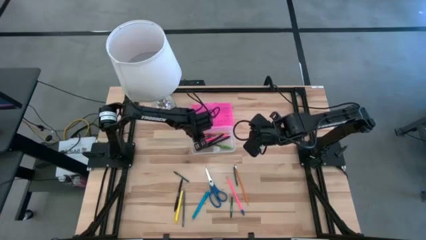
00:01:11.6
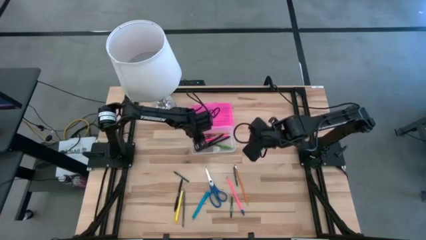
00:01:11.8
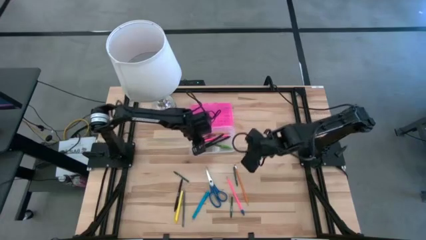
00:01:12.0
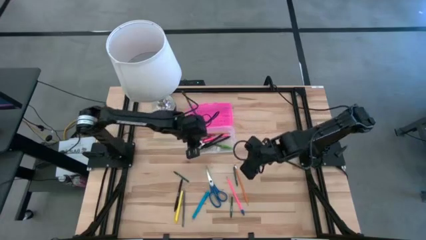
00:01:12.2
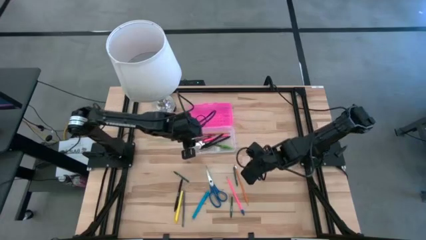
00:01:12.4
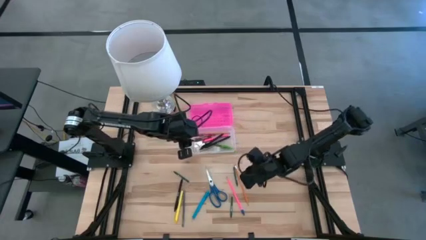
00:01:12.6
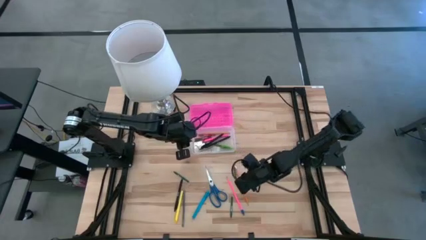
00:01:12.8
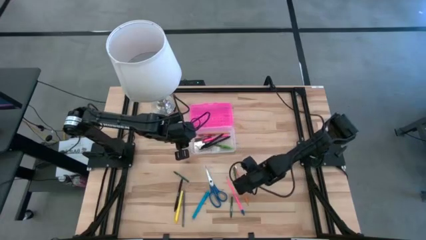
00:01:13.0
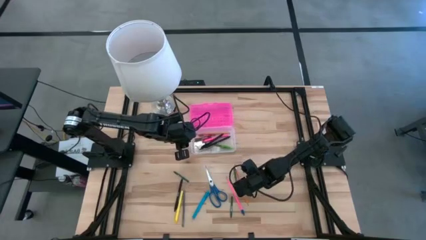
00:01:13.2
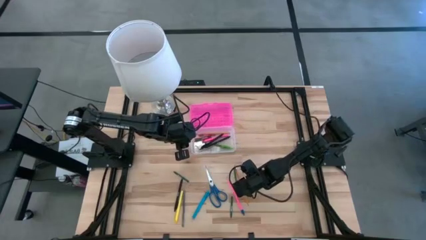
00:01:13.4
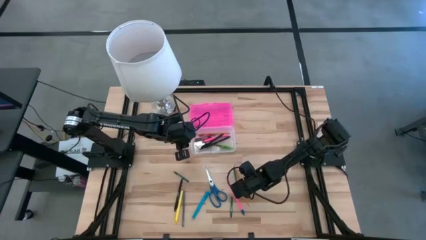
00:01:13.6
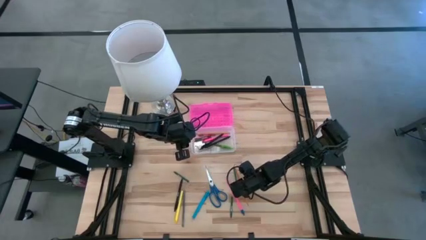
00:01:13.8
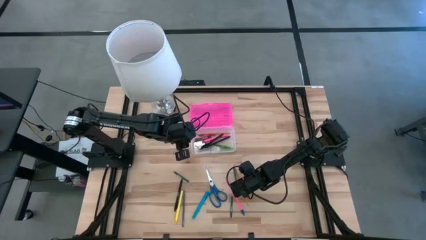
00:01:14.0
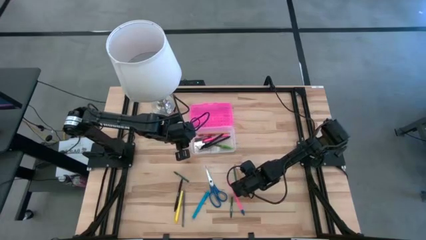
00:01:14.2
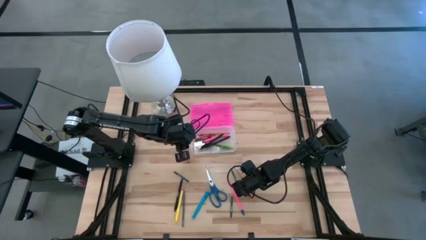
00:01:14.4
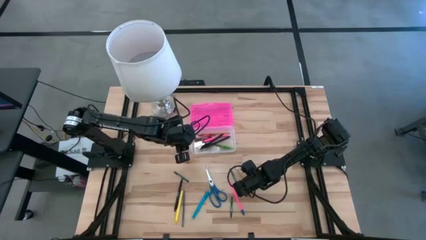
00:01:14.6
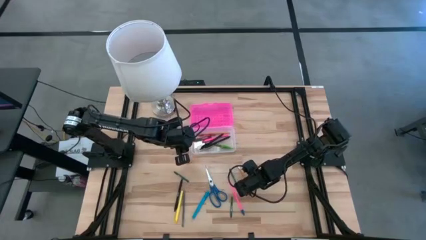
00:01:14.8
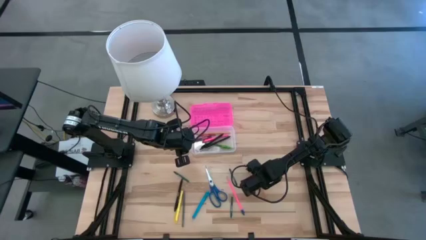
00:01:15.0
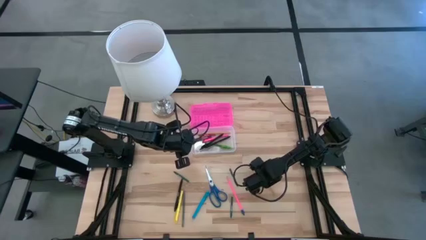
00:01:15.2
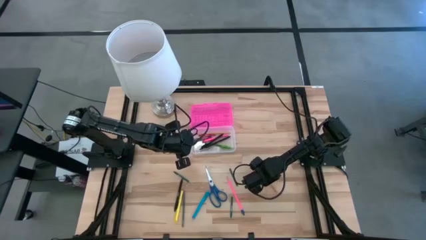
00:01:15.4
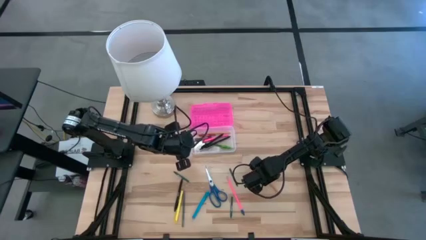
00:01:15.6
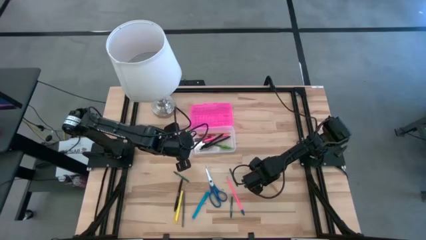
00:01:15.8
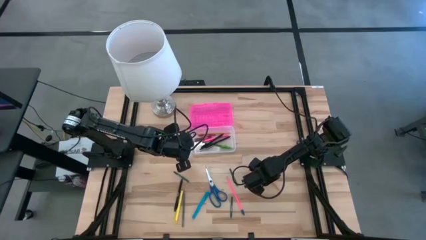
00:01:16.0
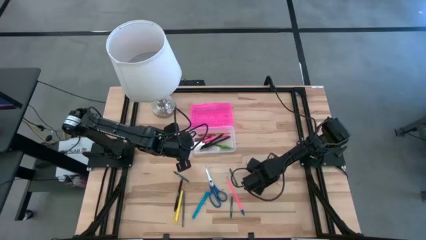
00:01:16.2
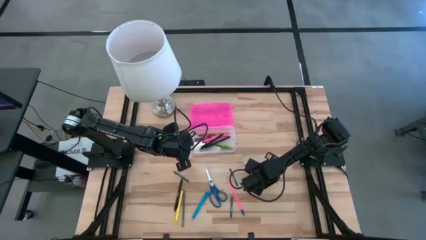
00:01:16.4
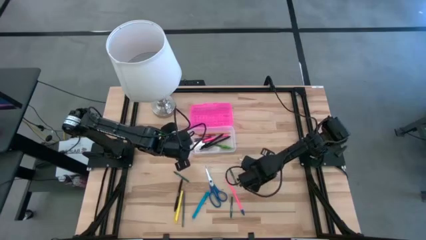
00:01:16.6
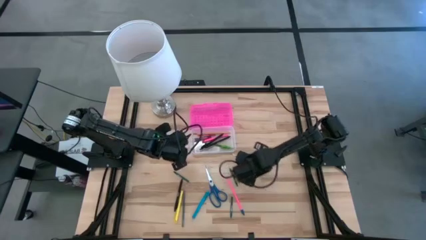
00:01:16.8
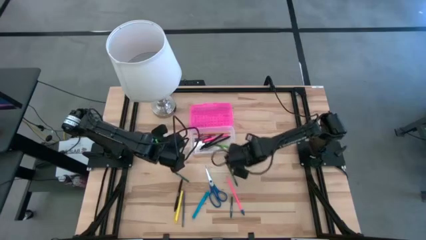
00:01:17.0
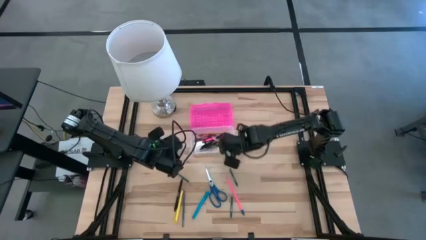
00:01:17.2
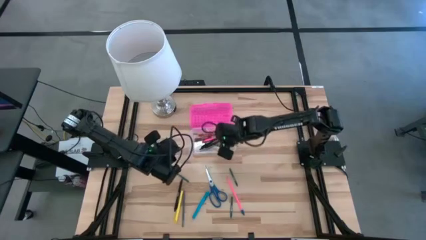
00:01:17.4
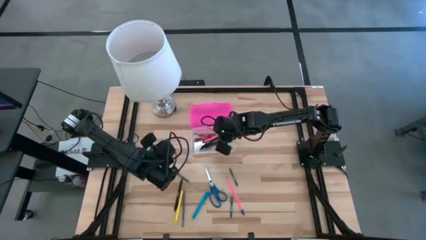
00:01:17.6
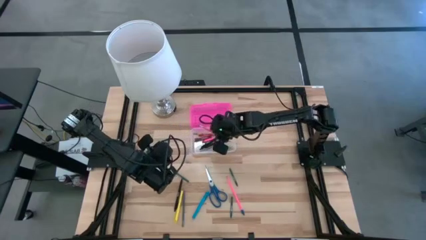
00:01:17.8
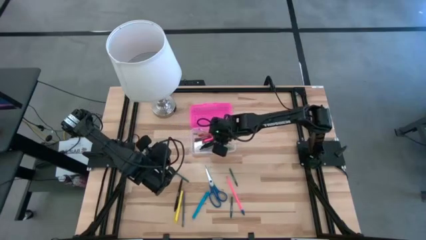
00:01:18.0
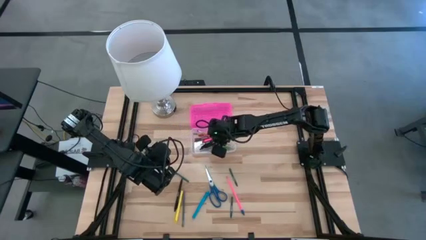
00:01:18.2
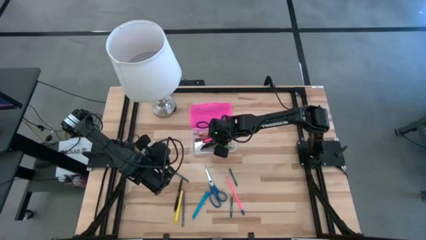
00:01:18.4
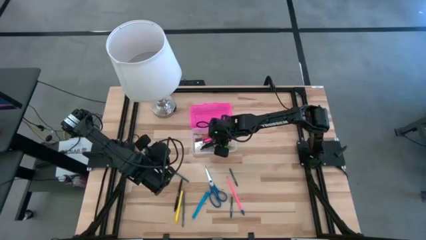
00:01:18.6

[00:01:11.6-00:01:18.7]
Task: Pick & place school supplies into a supply box
Put the yellow pencil into the supply box

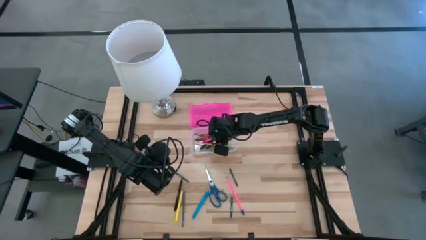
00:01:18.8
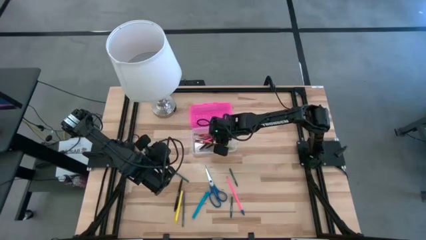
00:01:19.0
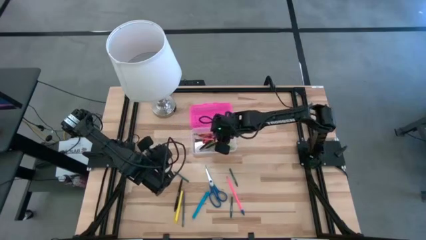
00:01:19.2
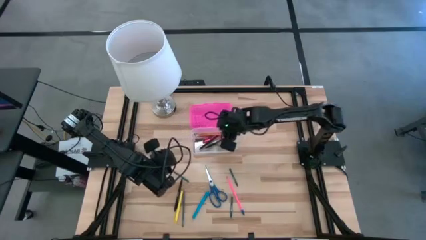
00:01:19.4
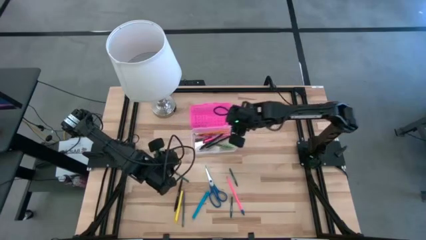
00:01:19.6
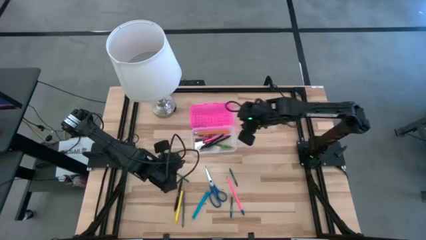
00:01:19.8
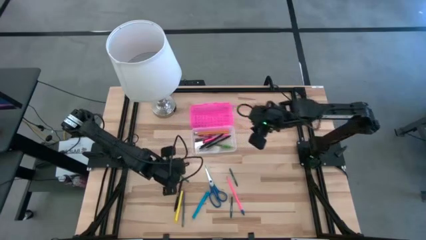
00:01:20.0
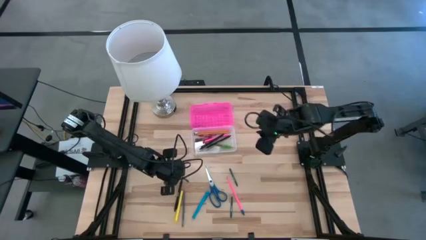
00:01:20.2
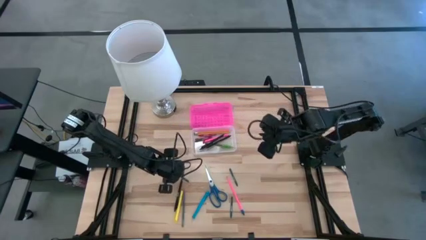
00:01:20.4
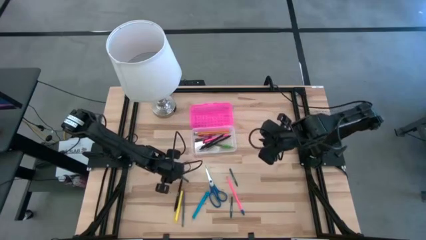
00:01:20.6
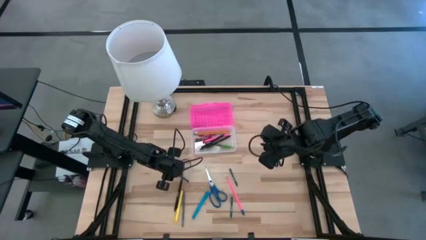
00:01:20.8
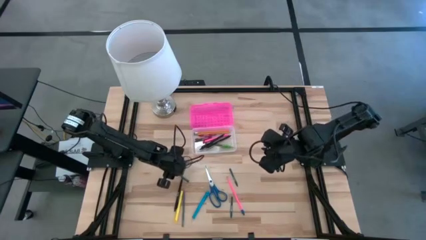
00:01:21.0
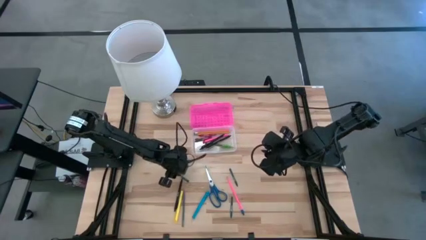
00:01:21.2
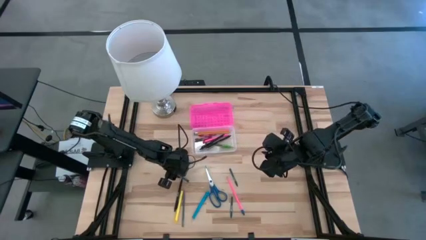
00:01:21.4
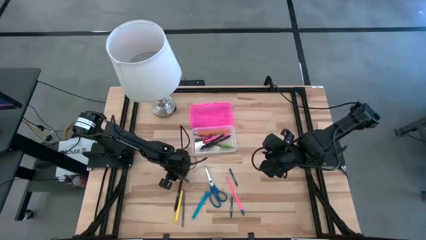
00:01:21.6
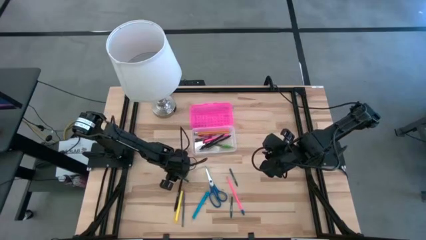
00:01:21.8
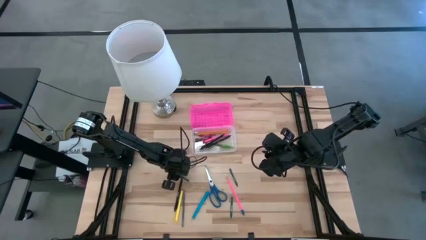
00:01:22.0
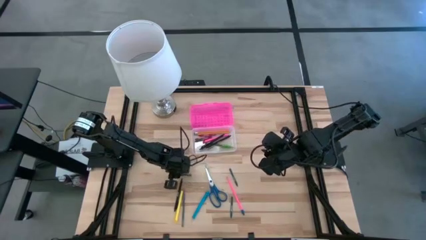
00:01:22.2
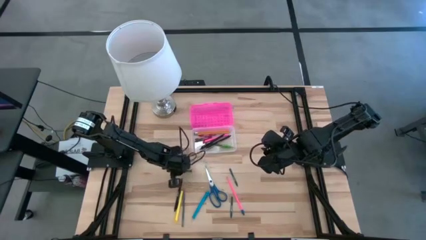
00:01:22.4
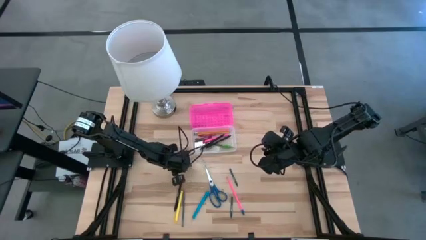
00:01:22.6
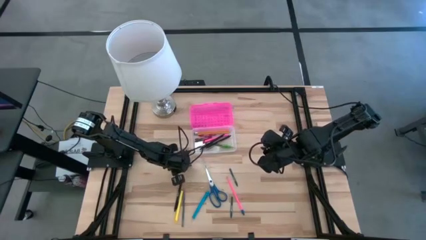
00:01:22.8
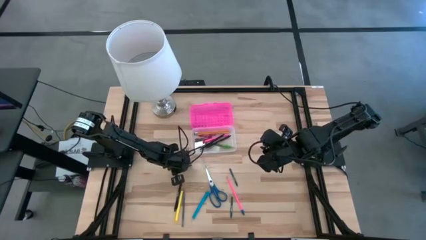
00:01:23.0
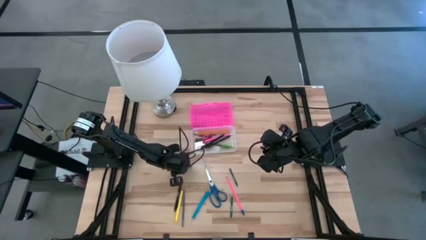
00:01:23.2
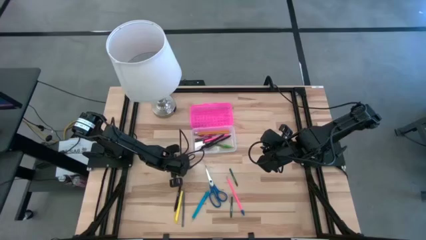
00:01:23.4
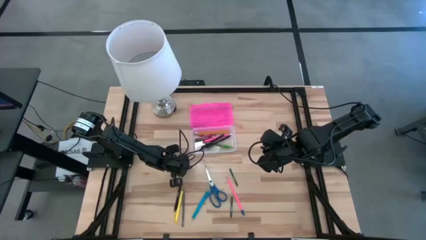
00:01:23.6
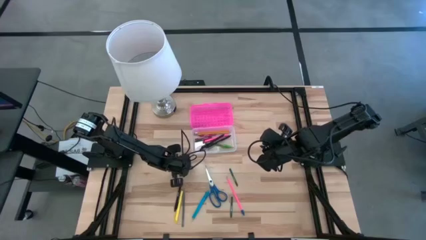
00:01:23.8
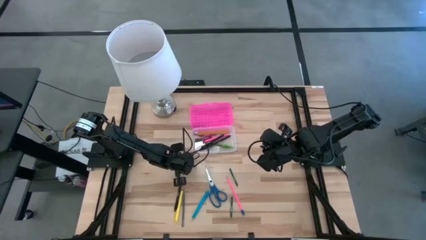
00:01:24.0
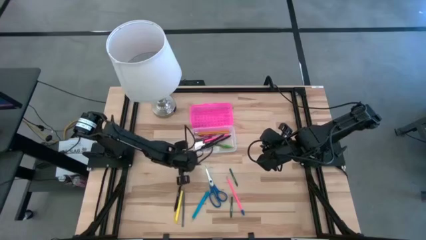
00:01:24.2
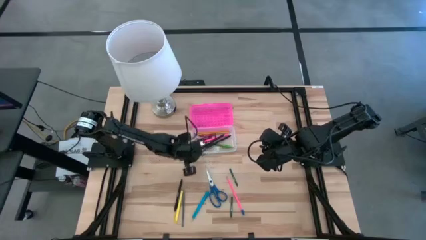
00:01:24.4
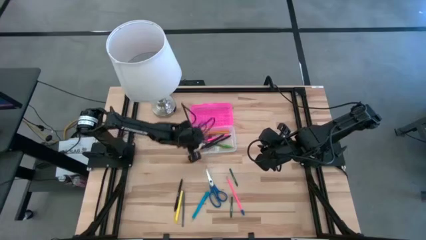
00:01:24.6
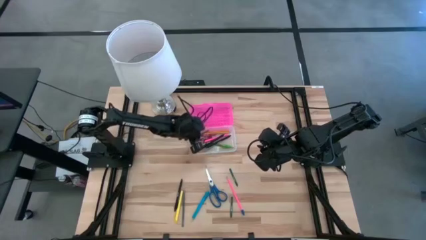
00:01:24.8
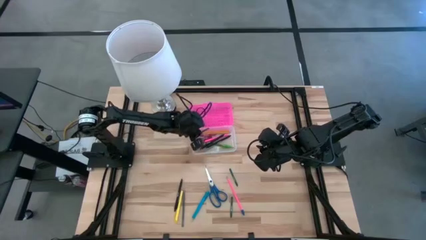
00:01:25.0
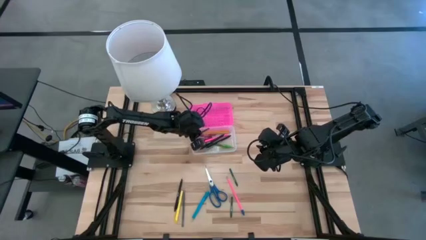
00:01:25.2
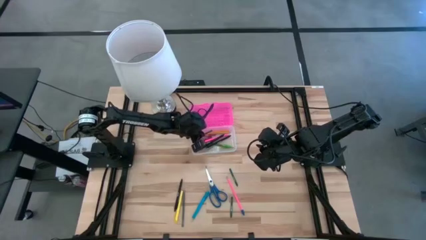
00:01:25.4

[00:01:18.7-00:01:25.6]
Put the top left green crayon into the supply box

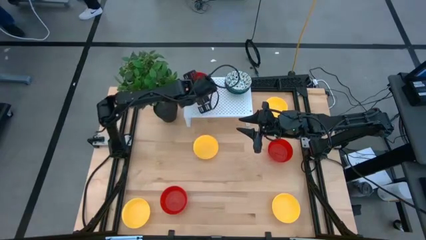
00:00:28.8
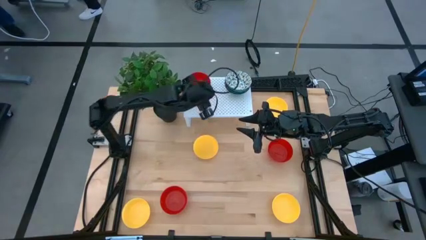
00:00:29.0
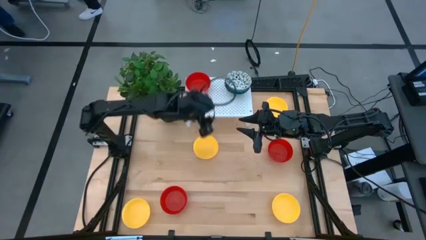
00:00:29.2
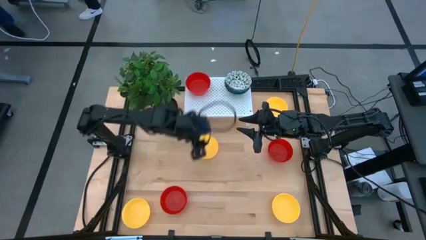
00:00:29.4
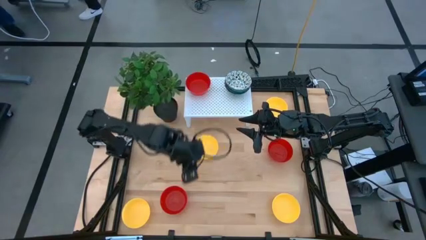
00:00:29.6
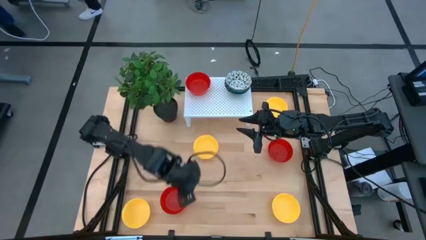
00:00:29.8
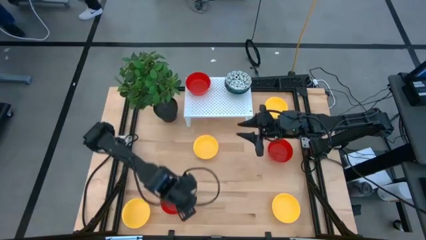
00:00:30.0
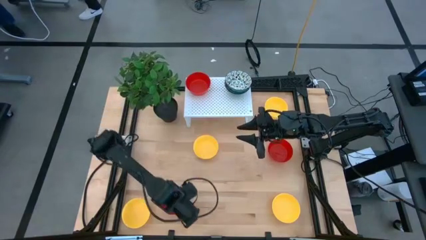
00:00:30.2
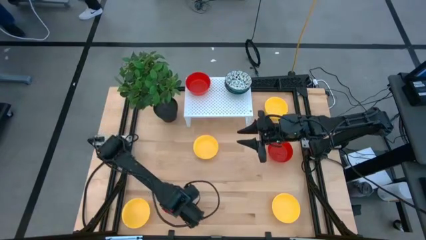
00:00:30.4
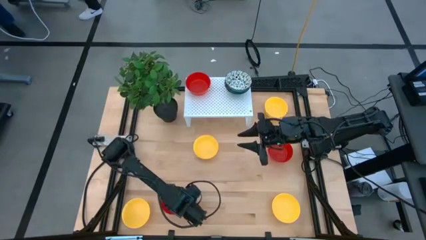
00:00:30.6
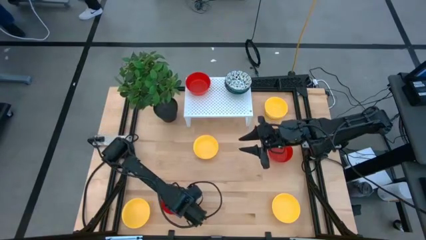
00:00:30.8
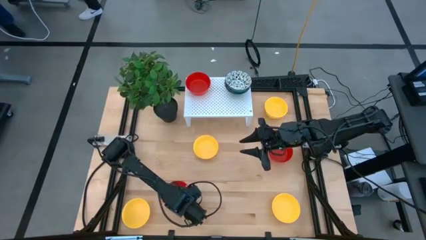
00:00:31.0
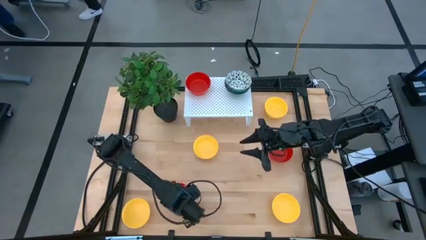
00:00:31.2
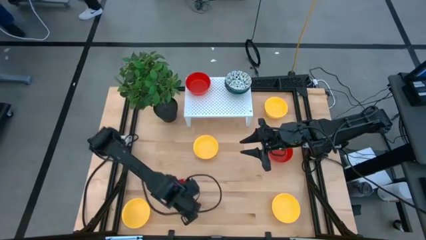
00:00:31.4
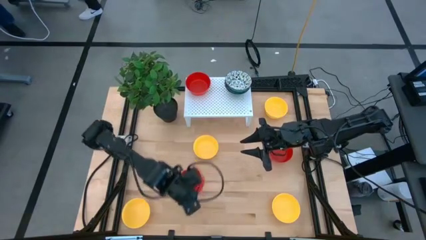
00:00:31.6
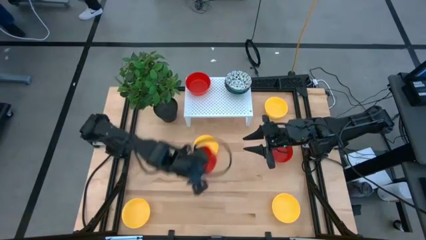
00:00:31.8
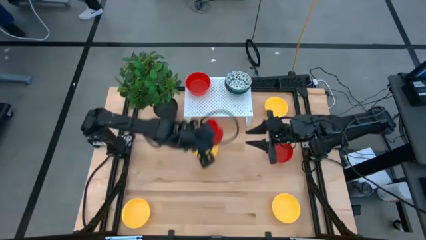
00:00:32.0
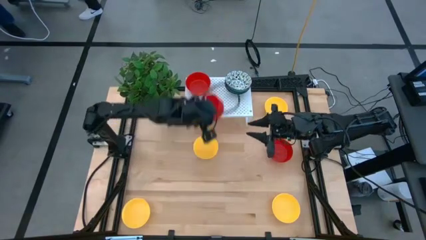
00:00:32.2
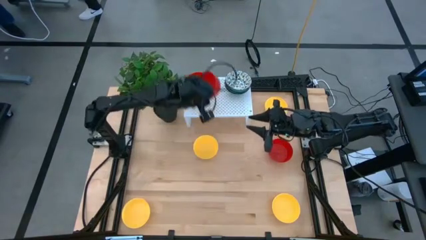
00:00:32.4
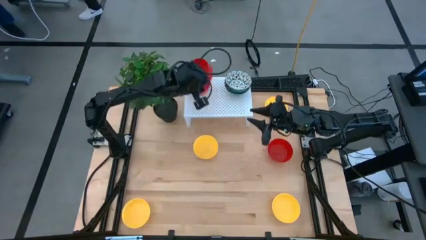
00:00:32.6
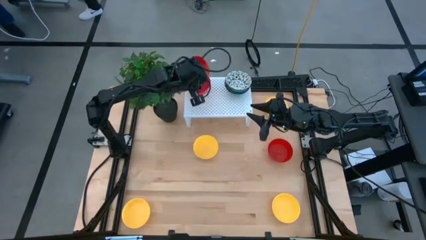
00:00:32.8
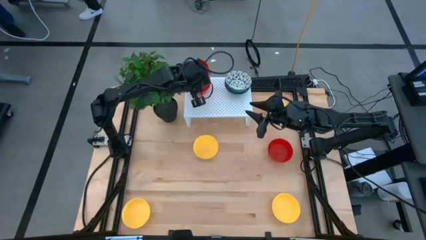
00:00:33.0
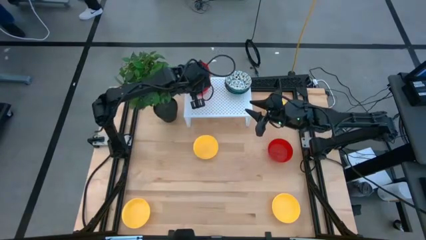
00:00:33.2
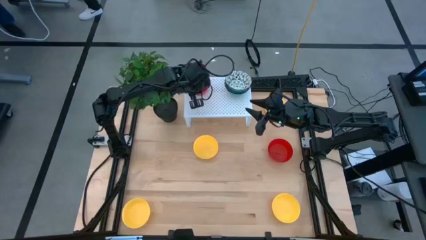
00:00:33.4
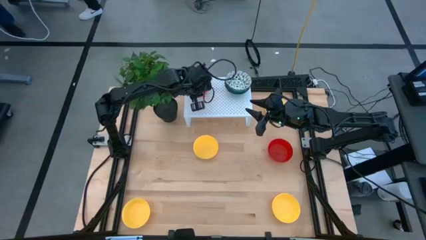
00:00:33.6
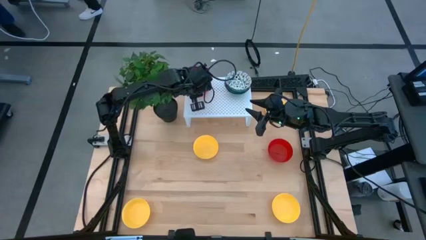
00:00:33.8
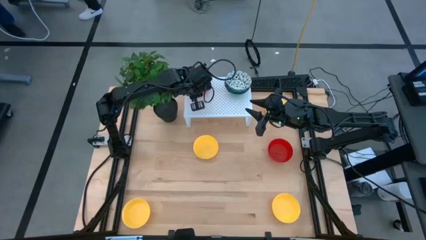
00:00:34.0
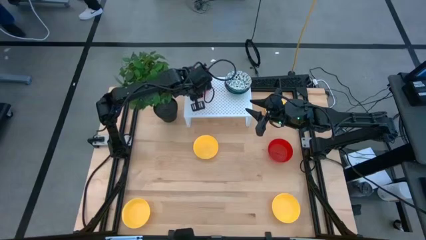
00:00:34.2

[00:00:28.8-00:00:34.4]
Task: Pick & Place Mini bowls
Stack the red bowl on the red bowl on the shelf
